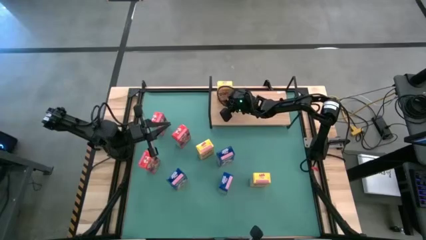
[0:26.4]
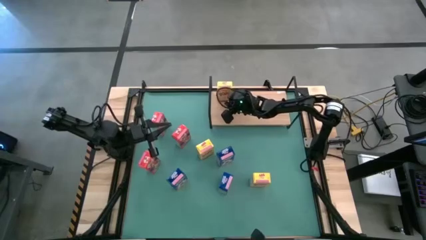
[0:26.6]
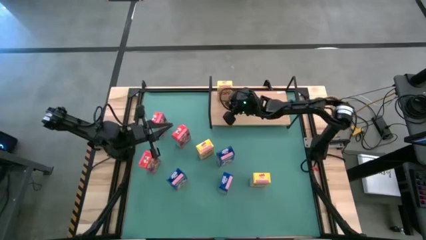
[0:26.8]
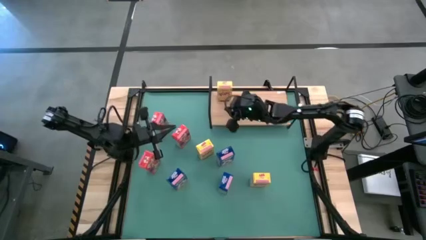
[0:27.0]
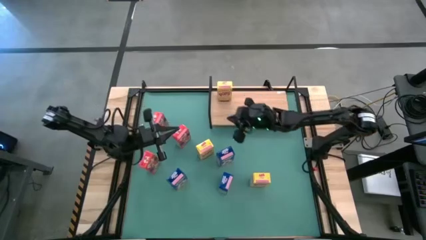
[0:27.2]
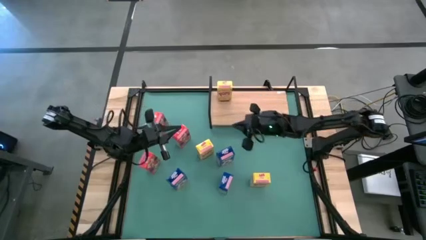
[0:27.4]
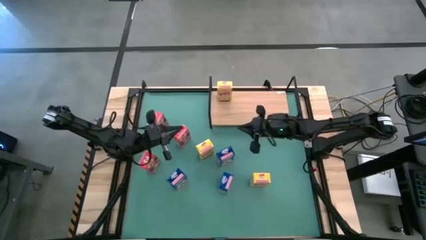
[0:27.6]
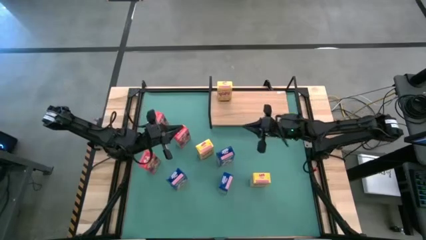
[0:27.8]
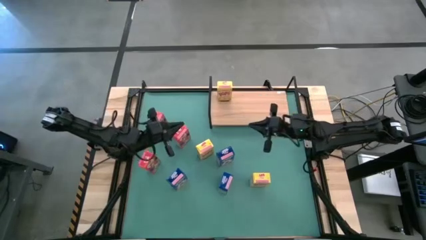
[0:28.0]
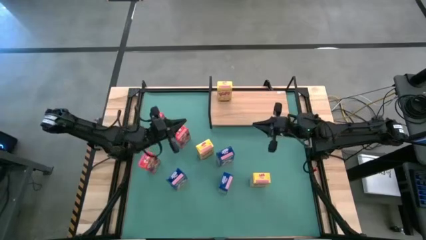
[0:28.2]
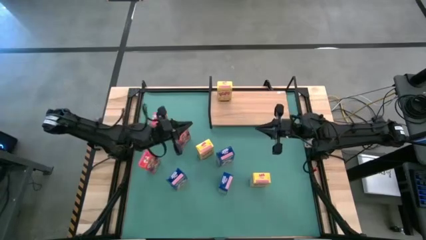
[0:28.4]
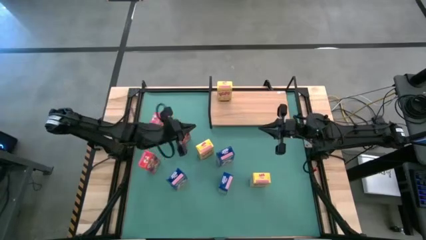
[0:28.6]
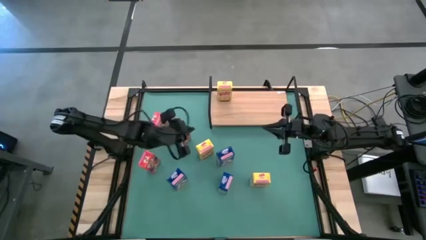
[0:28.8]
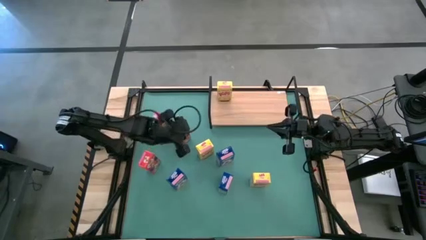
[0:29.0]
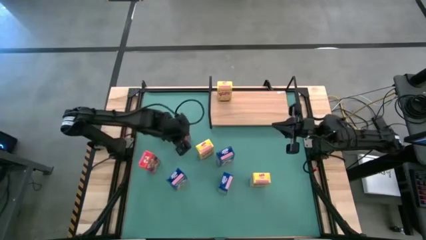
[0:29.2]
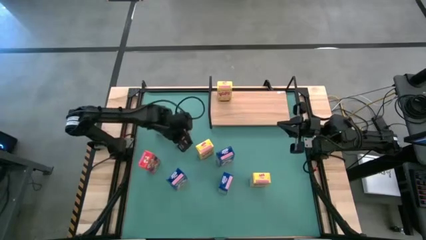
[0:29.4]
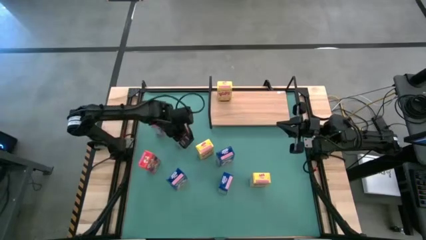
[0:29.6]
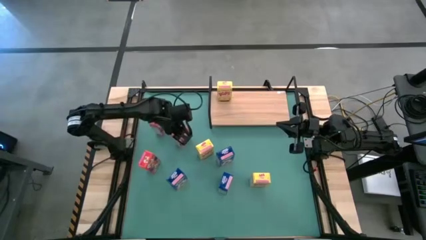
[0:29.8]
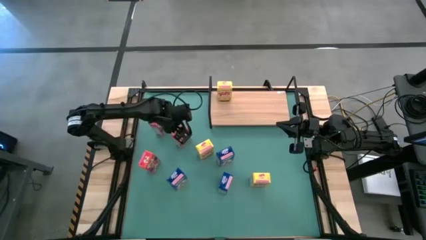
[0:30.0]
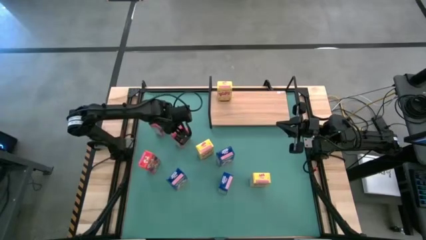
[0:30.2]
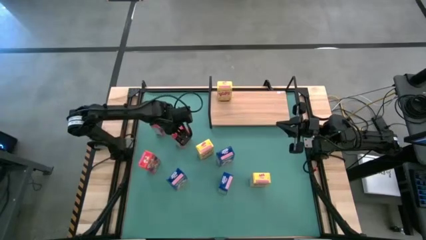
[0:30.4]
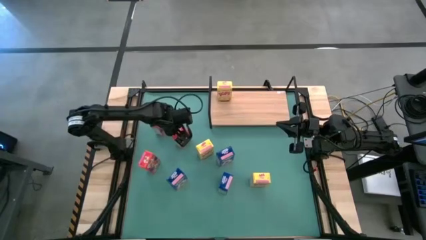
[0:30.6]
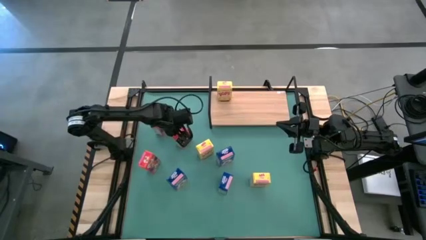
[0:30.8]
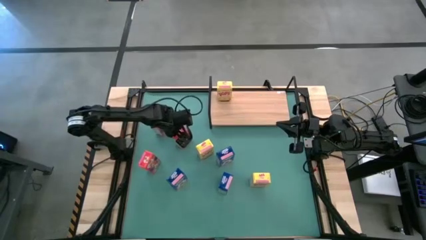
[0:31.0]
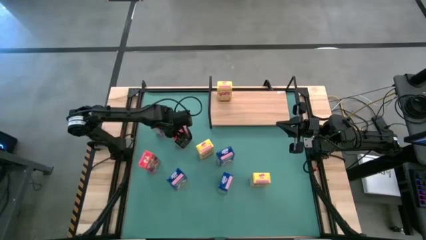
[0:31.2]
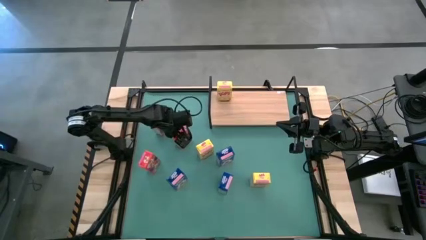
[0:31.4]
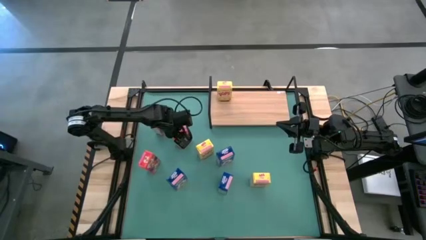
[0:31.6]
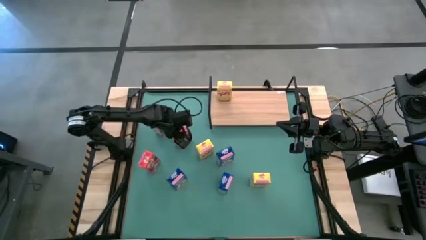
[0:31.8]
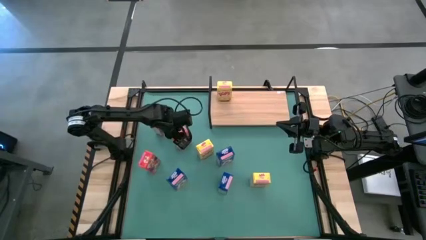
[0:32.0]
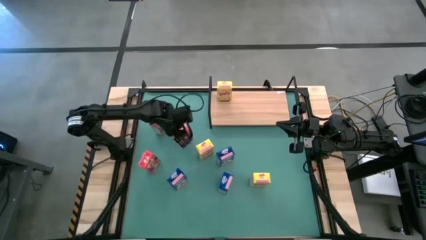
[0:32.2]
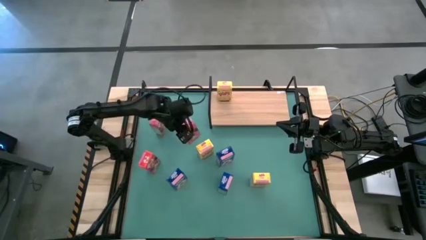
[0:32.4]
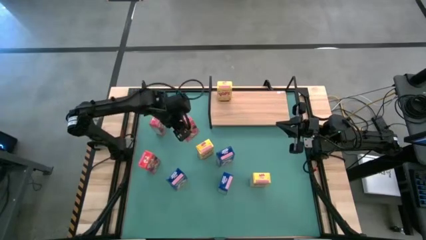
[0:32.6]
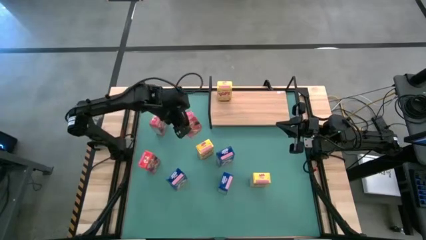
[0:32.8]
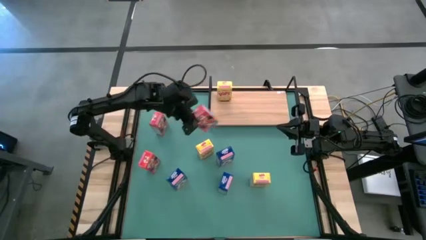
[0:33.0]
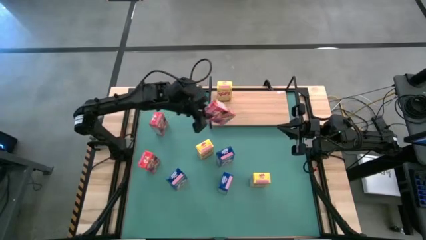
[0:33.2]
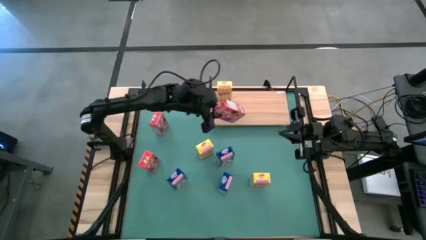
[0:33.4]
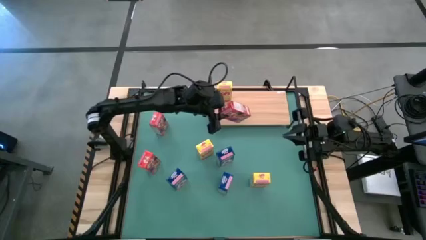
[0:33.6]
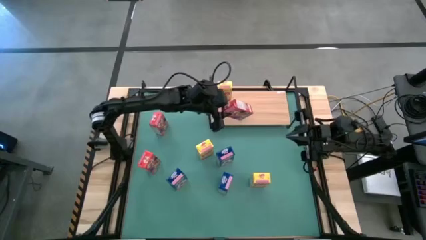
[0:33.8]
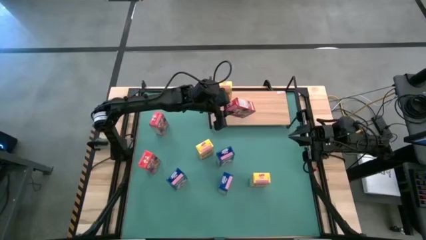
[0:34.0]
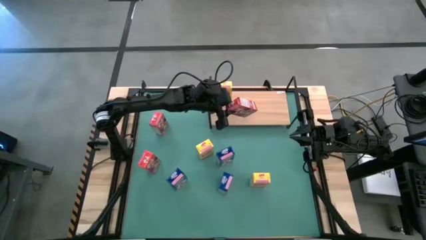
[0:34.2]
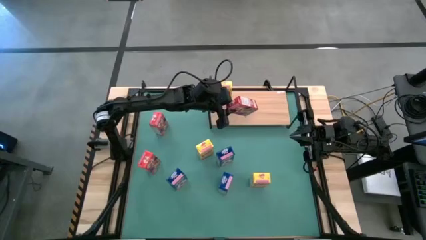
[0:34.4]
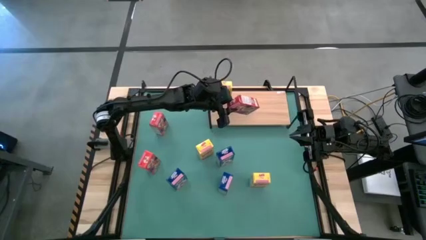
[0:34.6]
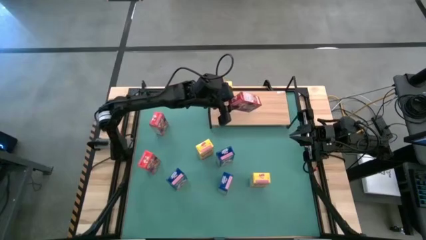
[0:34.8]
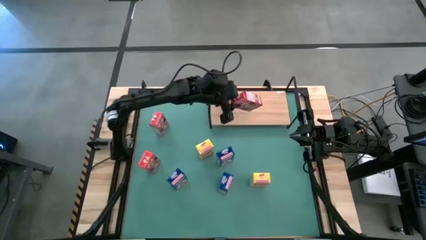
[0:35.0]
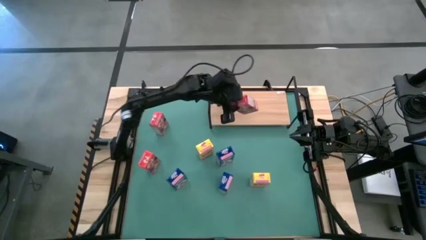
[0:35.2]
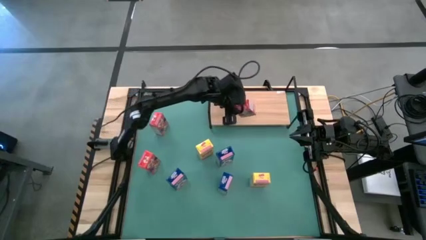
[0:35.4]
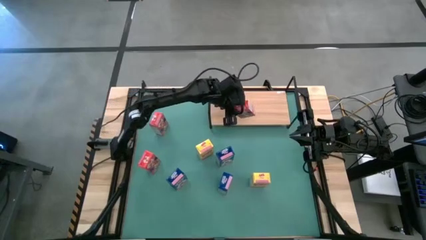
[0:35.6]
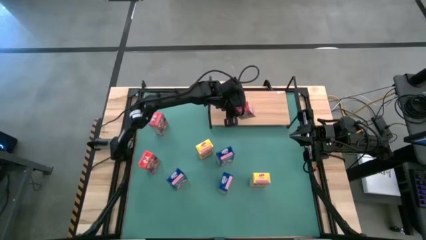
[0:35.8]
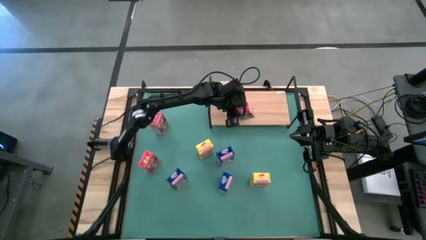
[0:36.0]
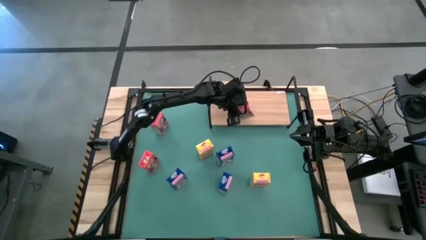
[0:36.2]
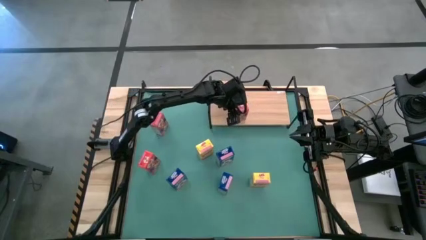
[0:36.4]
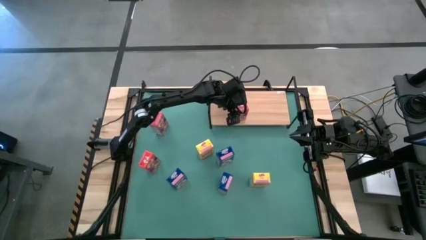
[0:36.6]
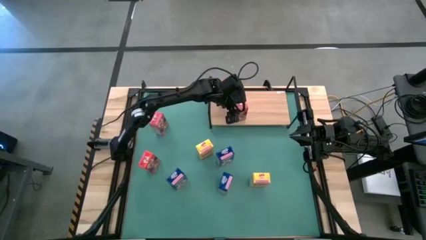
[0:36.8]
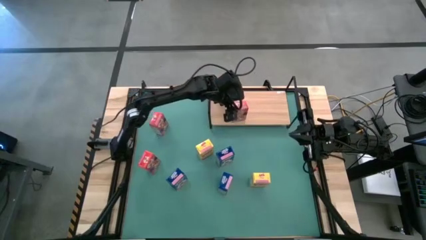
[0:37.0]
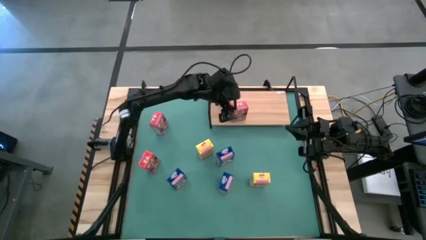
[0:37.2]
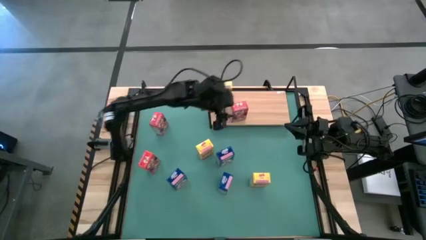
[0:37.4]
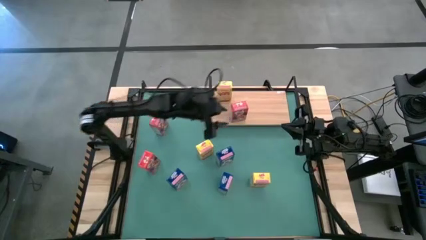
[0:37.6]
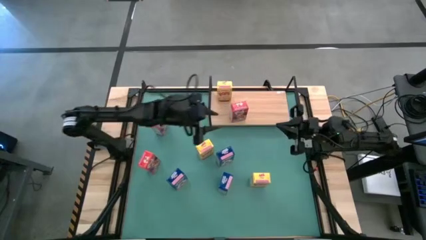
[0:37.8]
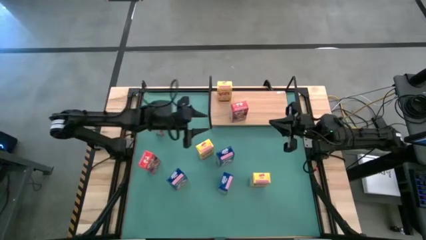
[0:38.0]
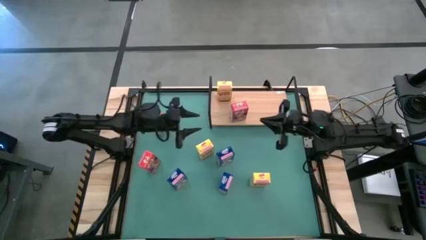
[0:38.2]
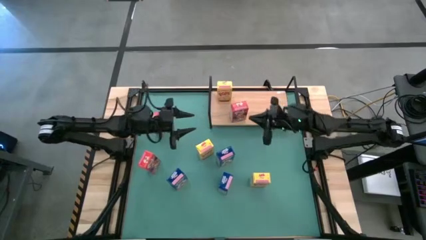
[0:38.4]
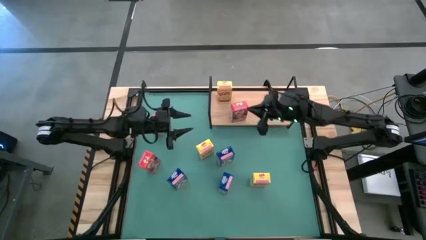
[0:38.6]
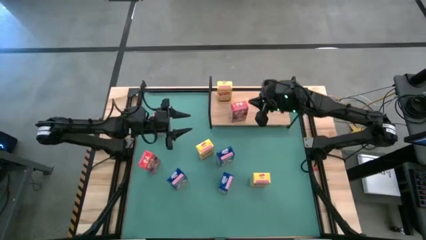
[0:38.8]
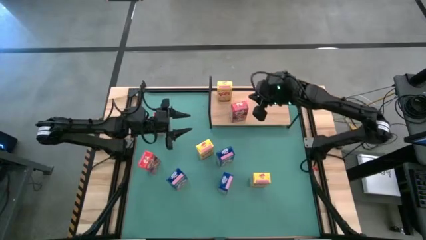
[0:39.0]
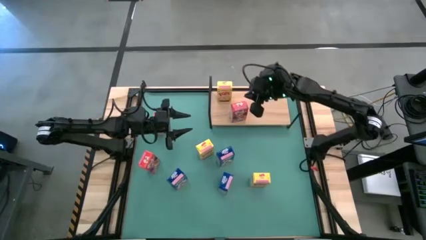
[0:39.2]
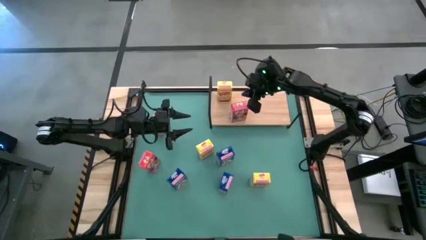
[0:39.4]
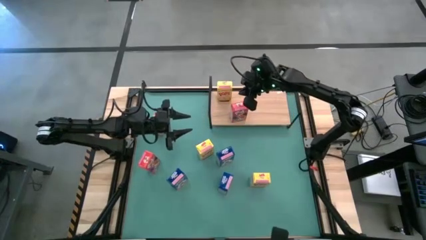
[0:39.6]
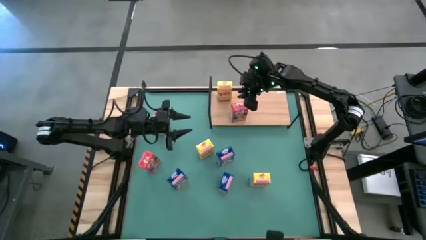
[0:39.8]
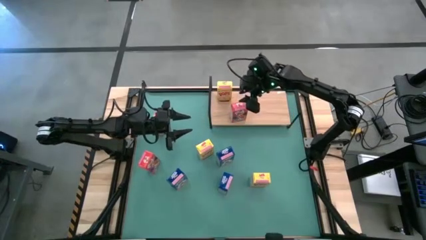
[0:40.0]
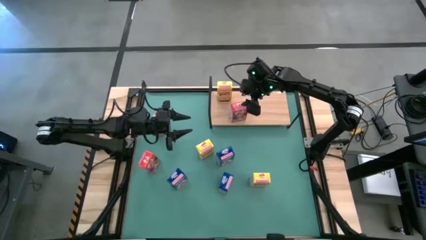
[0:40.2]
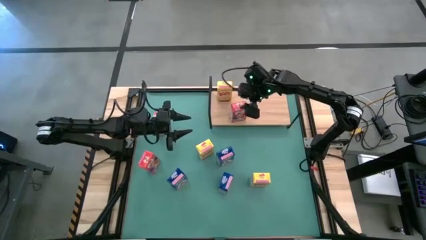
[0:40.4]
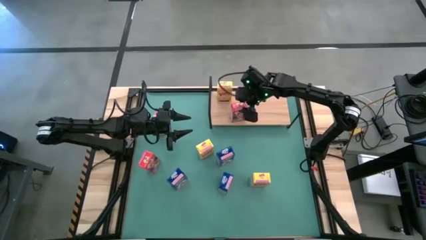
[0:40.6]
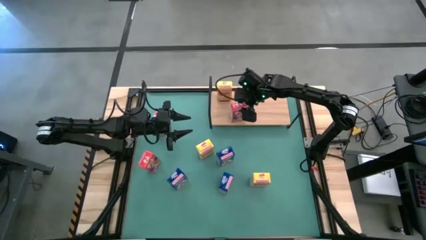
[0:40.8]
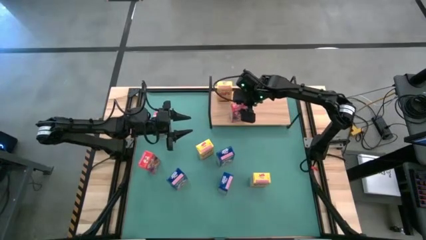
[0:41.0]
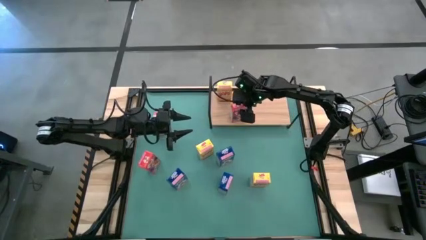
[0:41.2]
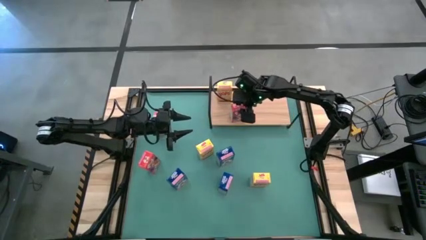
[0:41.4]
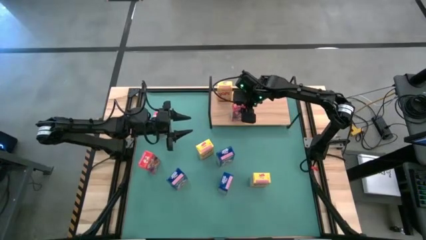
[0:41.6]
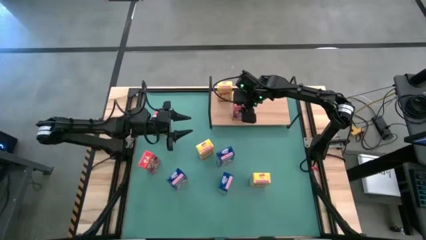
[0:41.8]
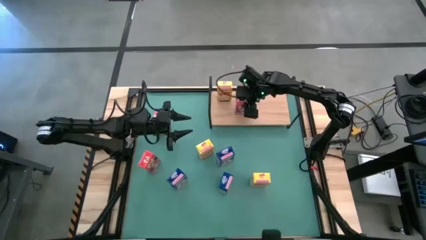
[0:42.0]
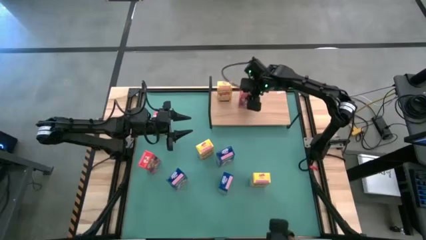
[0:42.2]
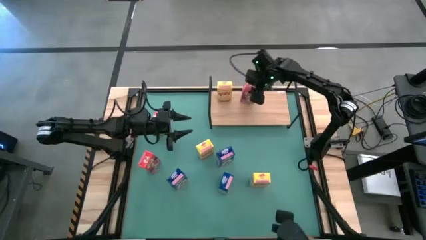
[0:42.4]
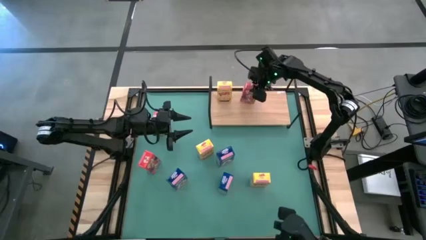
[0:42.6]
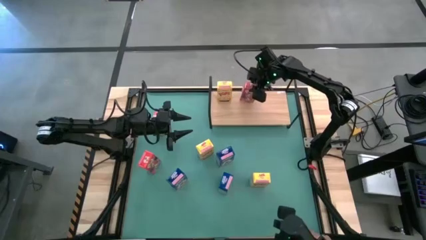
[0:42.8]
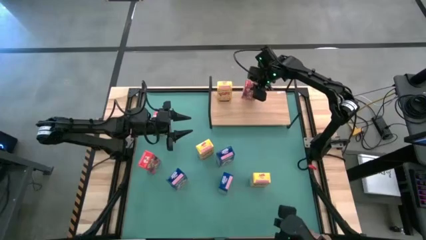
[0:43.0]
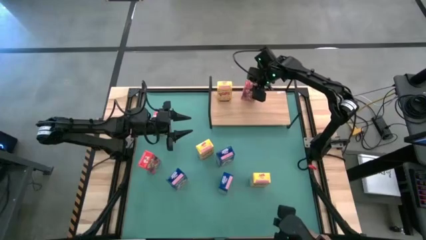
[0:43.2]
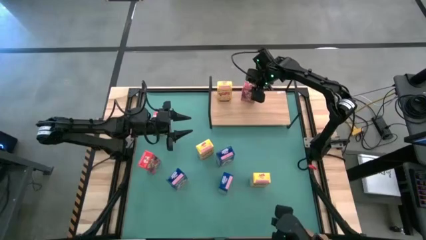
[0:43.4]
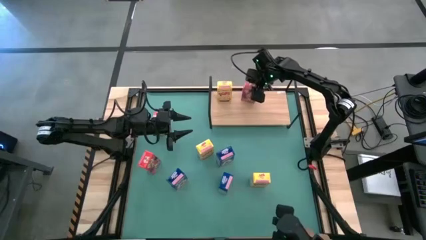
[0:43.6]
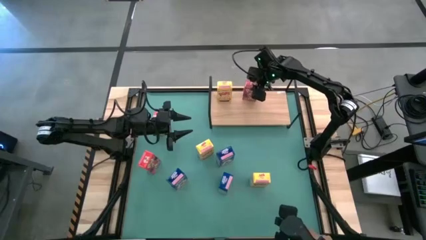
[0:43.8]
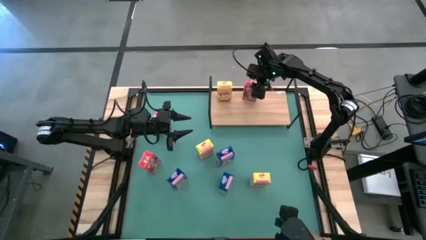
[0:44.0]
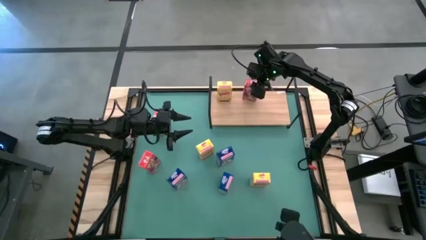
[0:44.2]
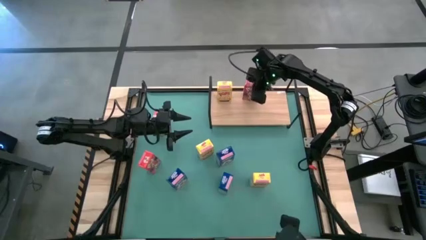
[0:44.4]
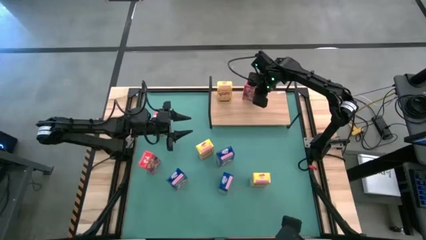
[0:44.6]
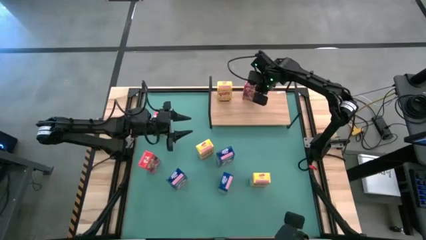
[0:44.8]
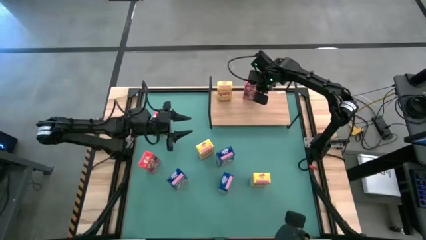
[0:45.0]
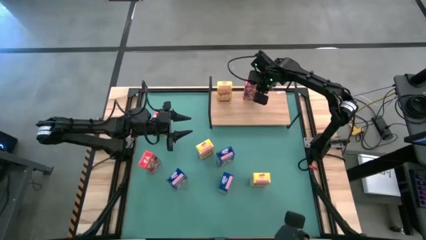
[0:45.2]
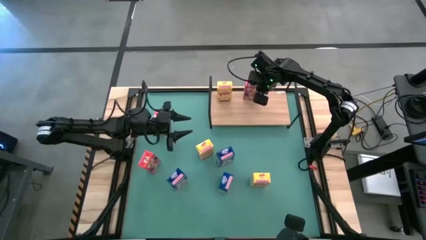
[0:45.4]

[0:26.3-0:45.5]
Task: Stack cereal on shelf
Put the right red cereal box on the shelf
